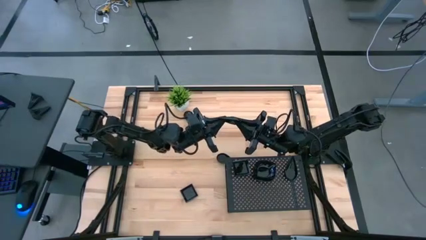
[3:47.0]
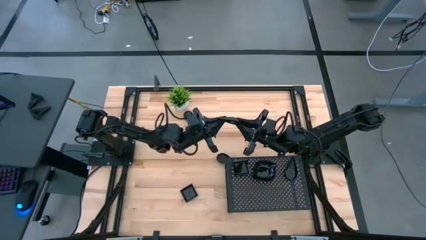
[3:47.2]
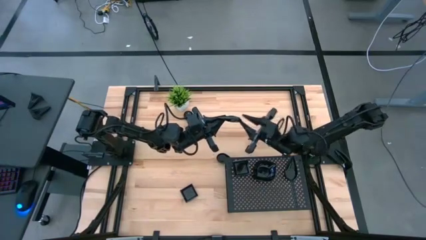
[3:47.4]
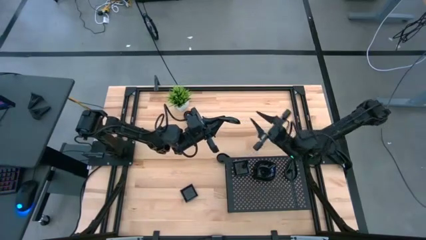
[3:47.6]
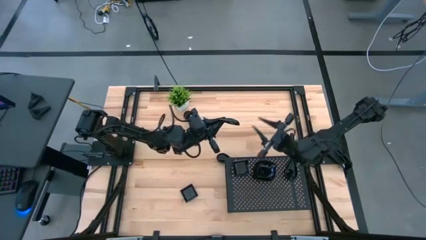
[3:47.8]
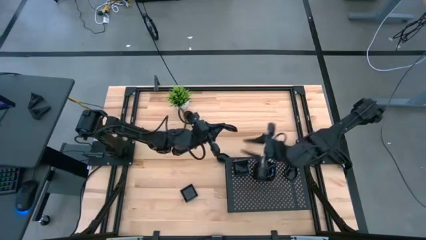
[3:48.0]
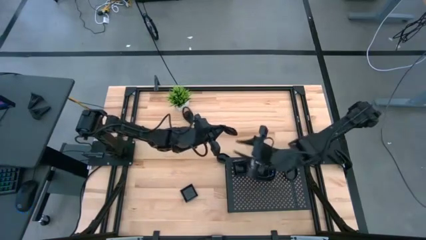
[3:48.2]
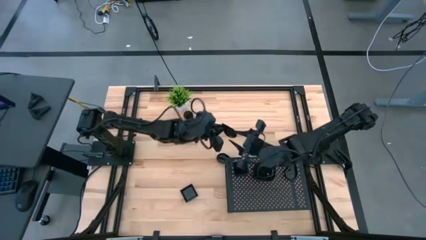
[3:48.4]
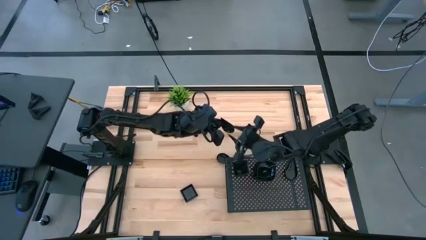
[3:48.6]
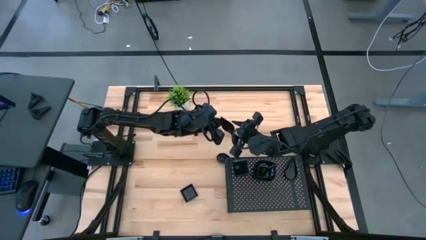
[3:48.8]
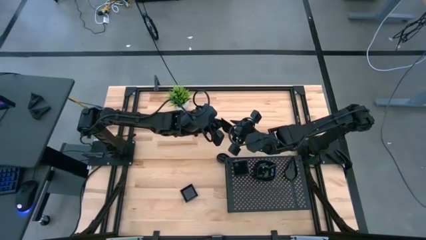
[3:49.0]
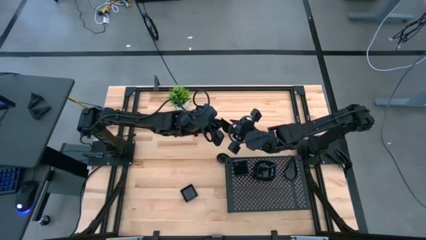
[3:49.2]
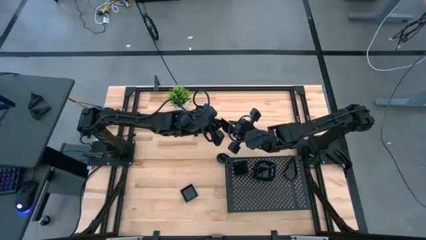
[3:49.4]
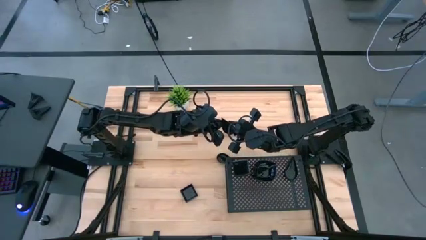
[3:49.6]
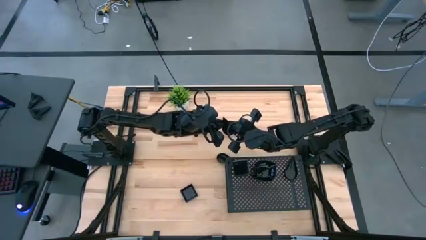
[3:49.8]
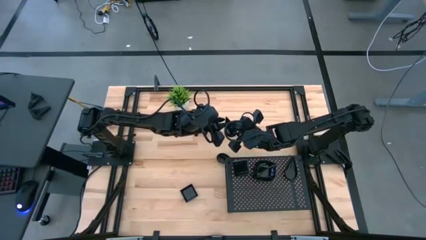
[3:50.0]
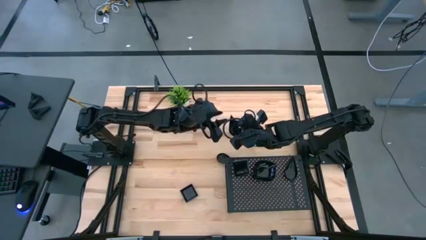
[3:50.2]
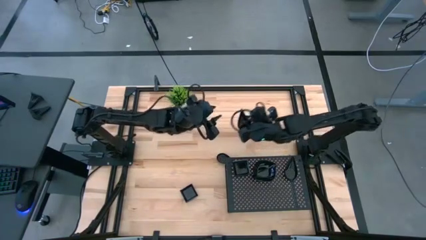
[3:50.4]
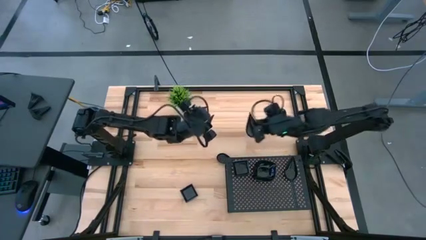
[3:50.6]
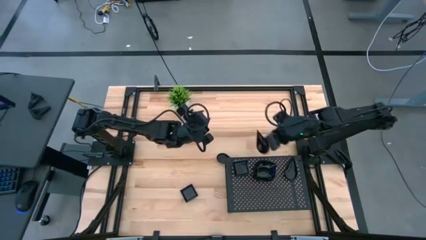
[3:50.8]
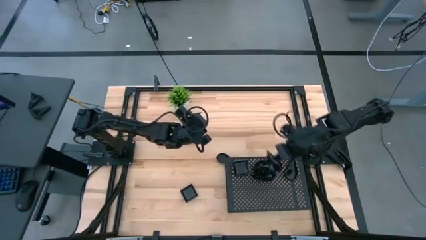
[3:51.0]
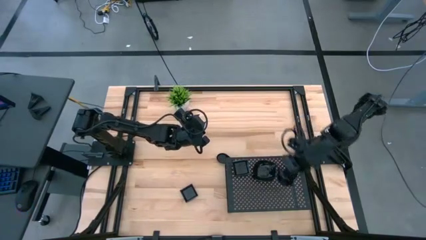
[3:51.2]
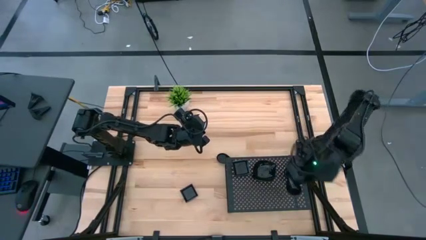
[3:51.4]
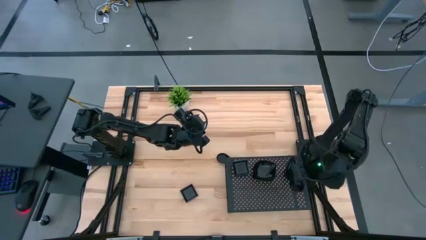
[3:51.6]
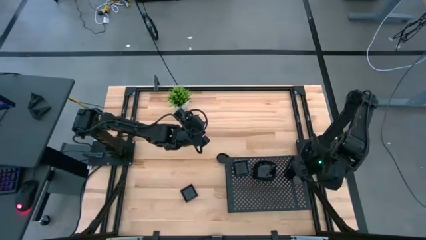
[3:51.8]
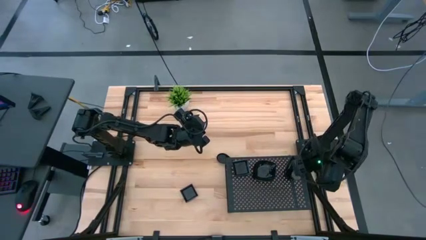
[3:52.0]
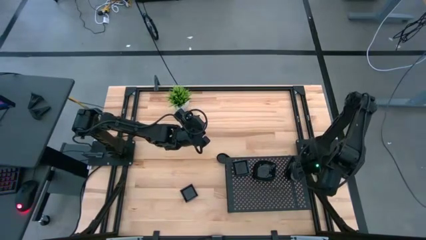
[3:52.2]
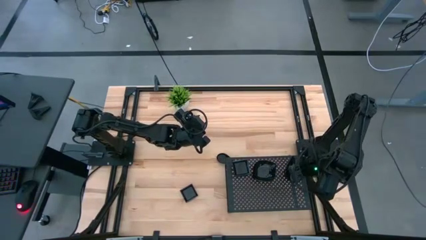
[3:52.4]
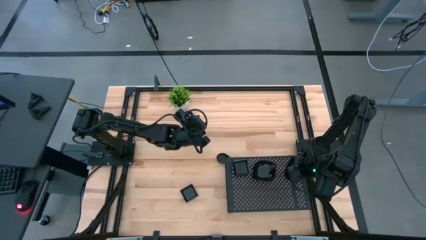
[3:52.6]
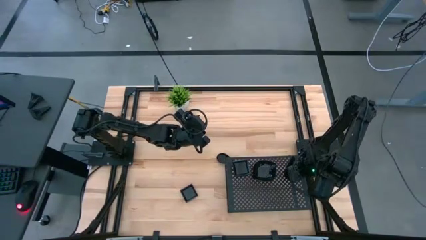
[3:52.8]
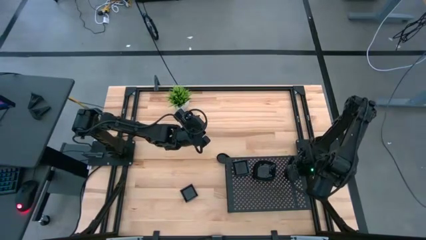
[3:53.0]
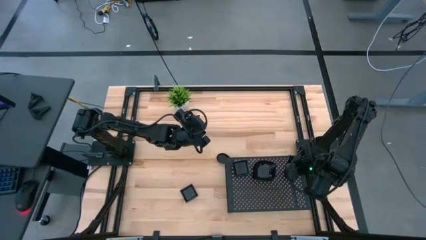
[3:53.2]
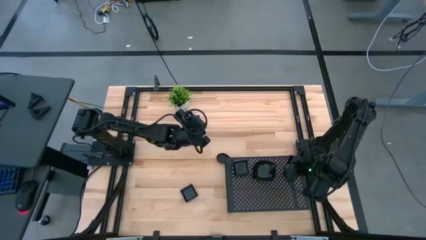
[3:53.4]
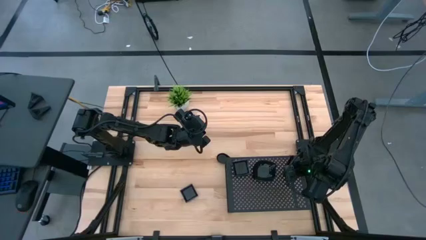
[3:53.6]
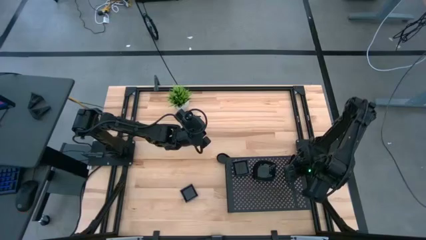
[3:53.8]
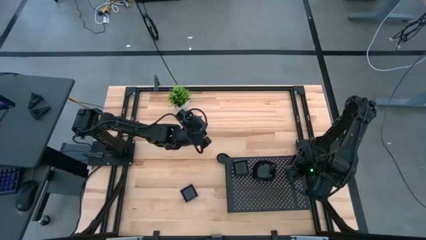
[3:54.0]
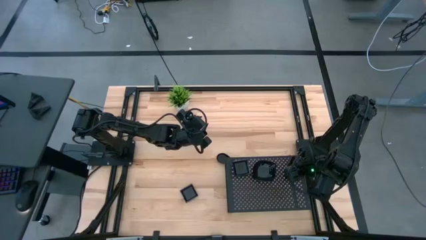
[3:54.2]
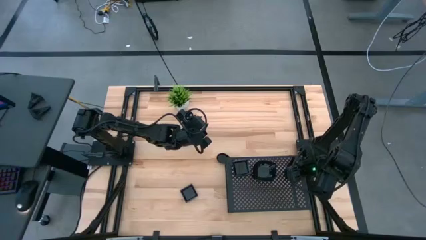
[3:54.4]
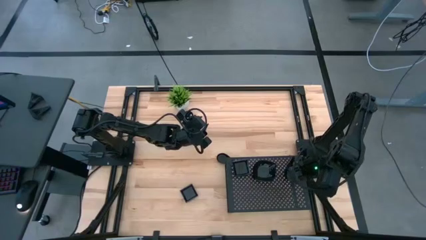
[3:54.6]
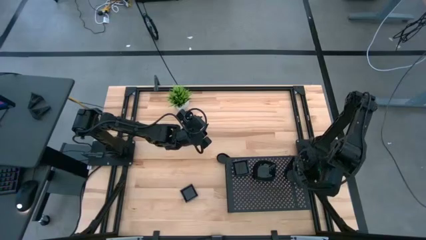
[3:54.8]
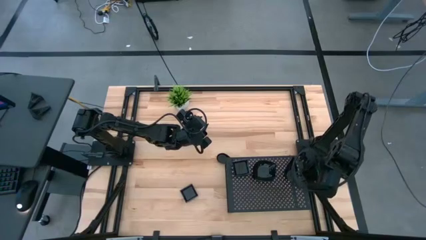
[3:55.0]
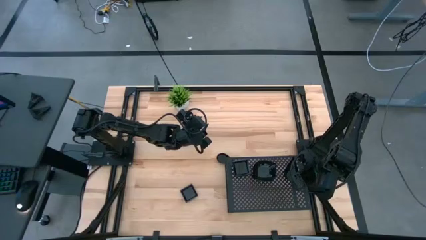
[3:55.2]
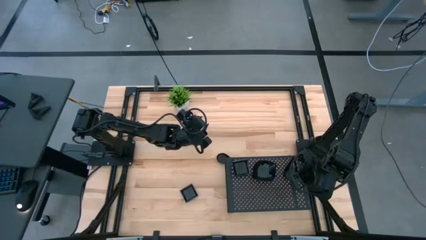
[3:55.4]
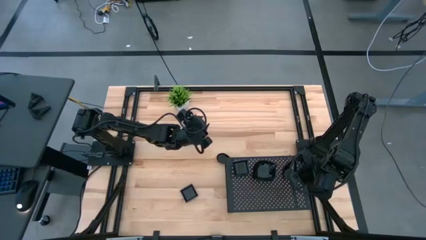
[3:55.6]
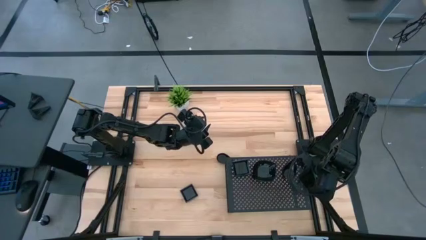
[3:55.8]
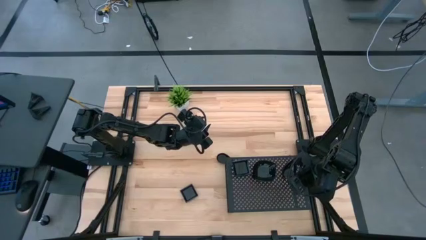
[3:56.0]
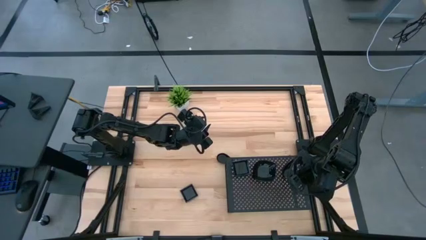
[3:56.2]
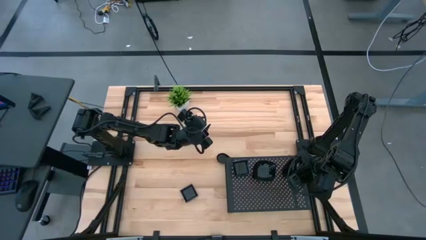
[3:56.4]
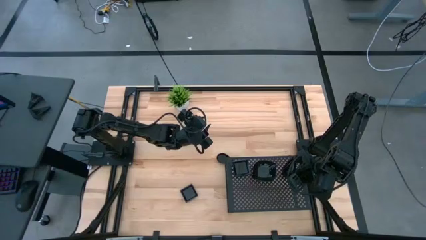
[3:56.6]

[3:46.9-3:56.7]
Task: Pick & Place Mini shaped plates
Stack the drop shaped plate on top of the drop shaped plate on the shelf

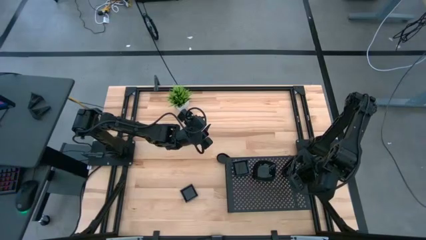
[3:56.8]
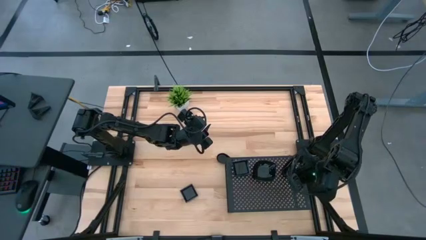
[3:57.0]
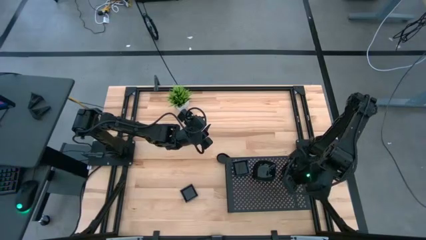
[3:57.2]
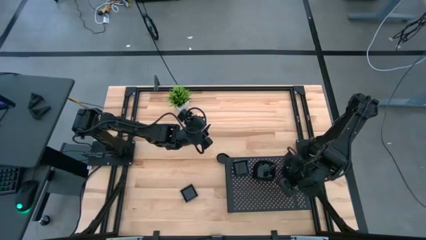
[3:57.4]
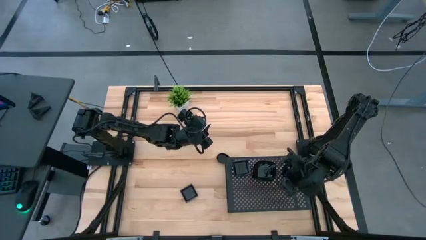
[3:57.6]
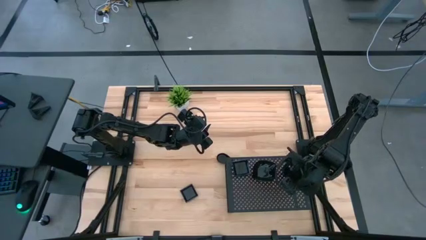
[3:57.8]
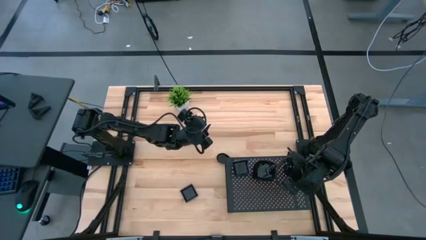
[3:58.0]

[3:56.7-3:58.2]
Adjust the stacked drop shaped plates on the shelf

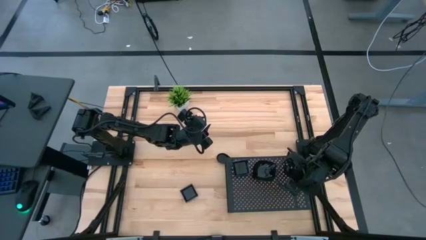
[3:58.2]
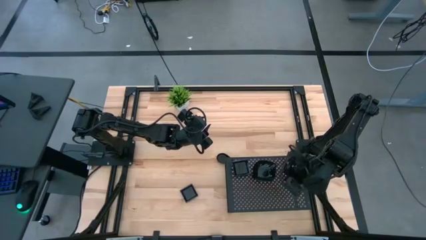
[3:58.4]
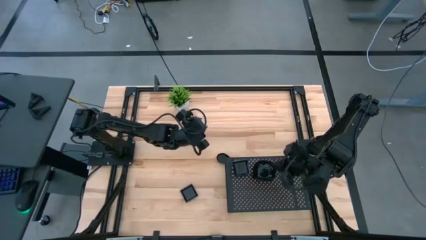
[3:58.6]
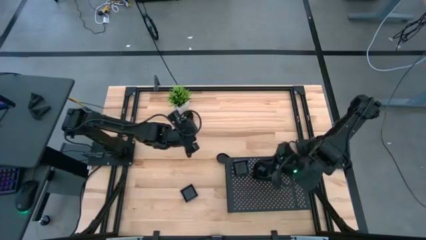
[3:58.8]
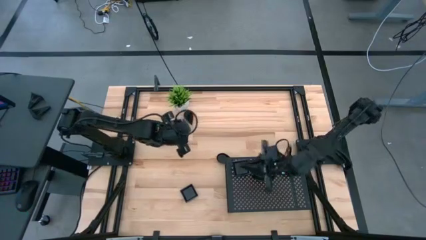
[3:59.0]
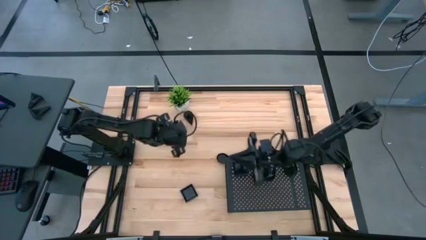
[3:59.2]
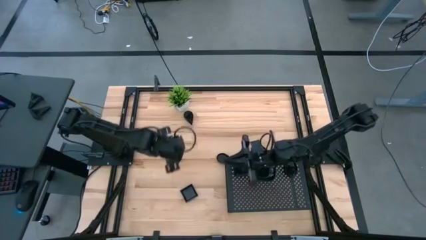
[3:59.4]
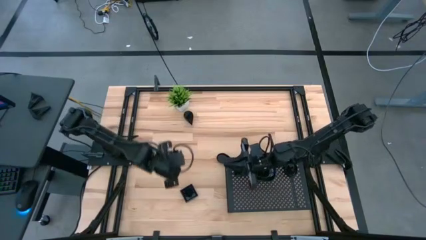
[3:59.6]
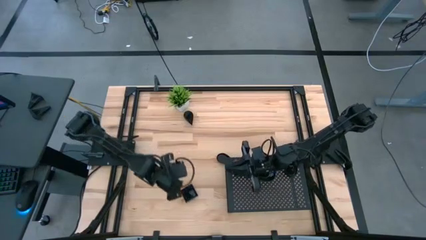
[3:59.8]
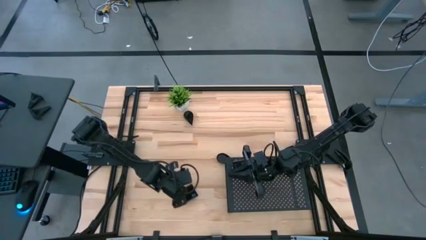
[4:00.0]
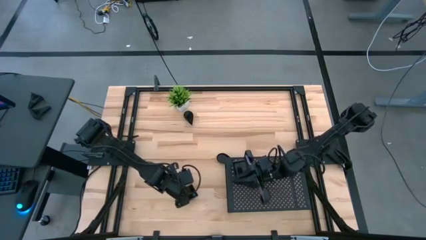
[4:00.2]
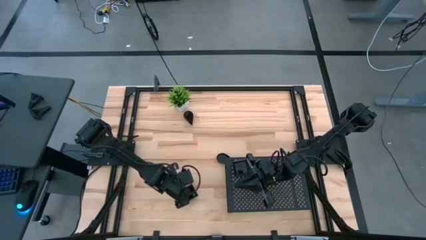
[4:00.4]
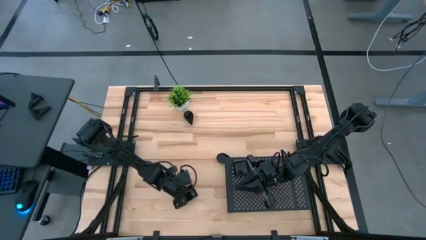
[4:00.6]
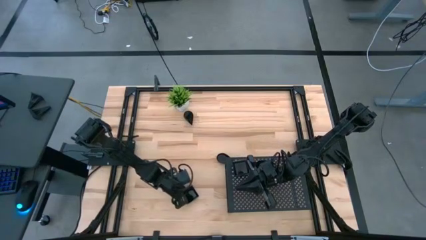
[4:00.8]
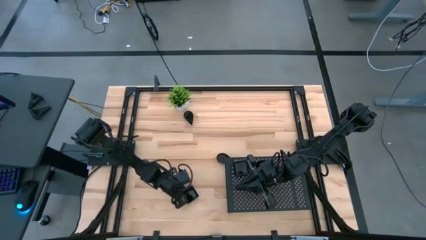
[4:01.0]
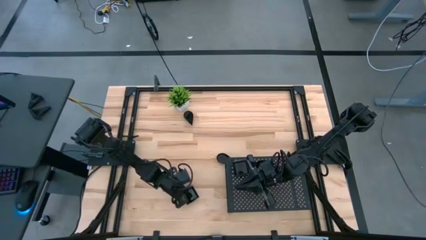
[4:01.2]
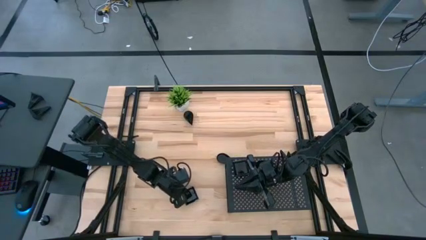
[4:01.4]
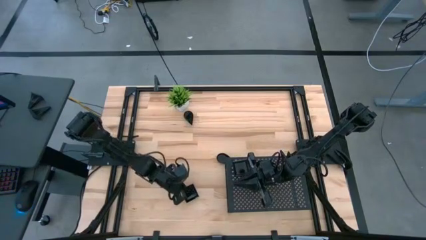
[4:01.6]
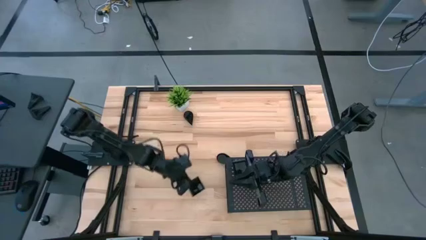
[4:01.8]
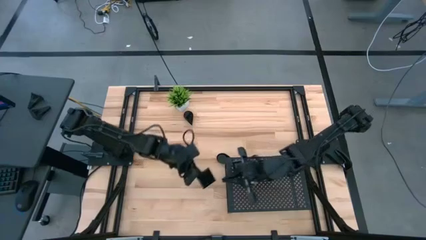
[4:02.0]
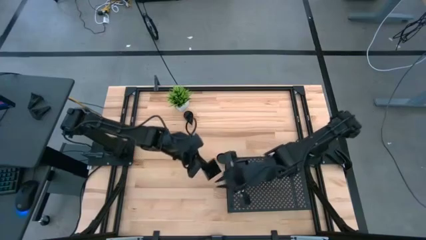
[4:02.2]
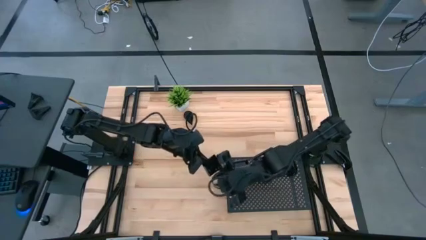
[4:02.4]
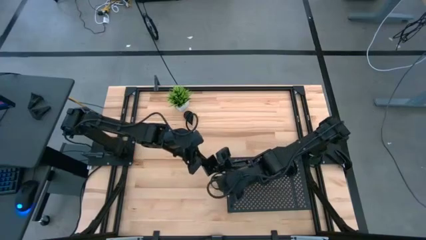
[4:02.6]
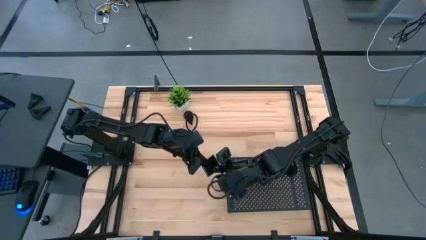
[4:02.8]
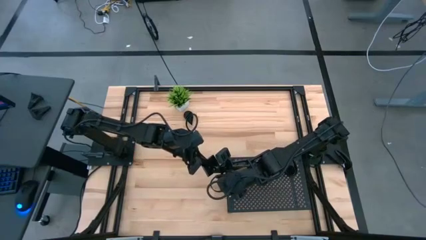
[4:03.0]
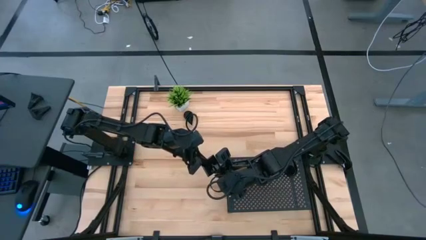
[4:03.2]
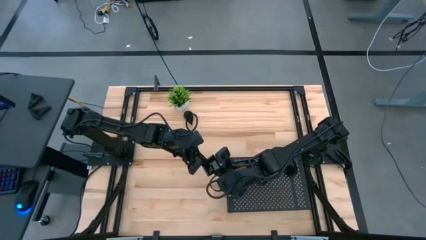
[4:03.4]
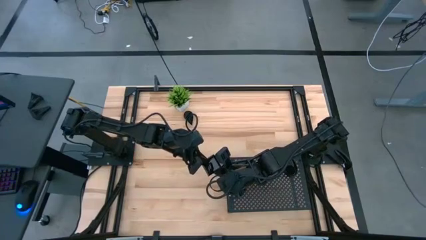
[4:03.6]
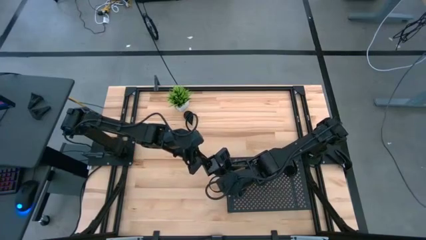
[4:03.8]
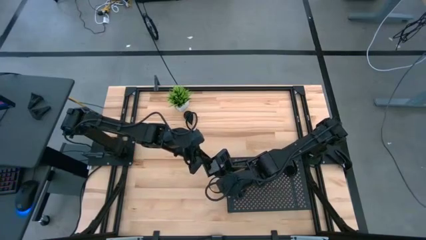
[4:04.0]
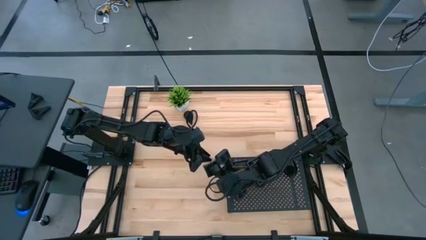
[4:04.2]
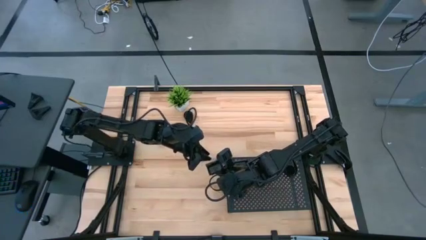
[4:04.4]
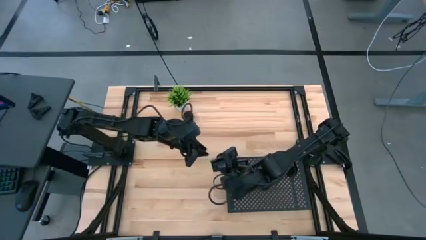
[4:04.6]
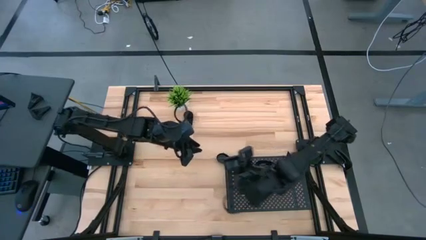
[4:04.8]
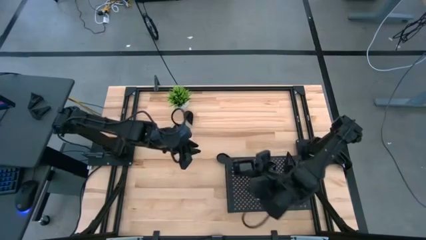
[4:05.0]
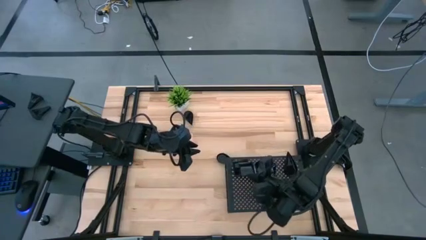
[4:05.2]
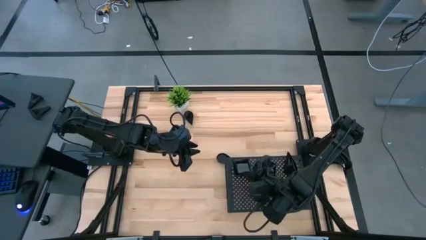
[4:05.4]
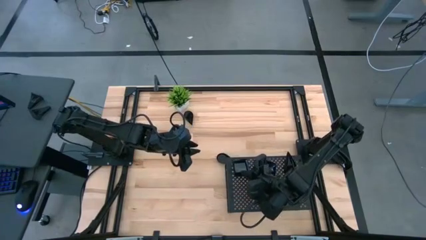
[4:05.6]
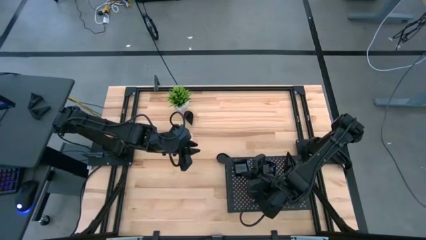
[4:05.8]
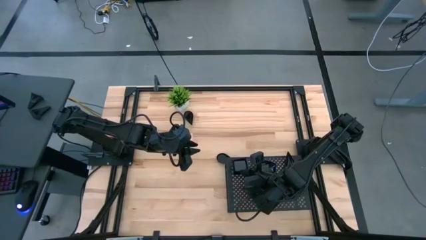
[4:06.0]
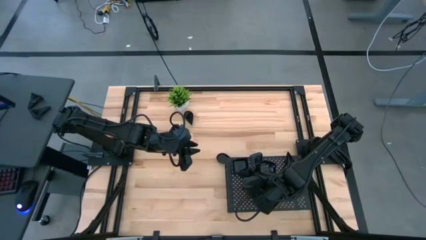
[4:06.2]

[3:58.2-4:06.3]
Stack the square plate on top of the square plate on the shelf
